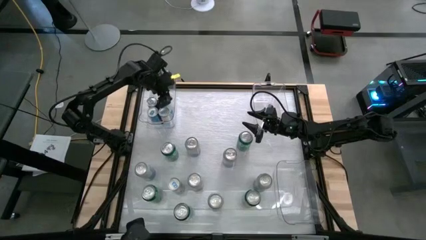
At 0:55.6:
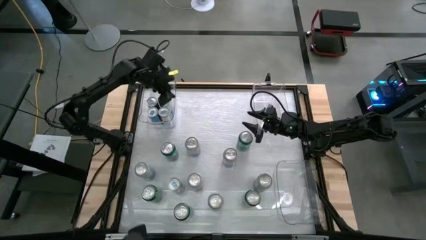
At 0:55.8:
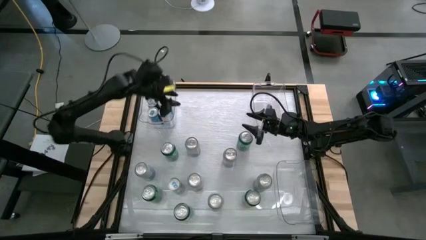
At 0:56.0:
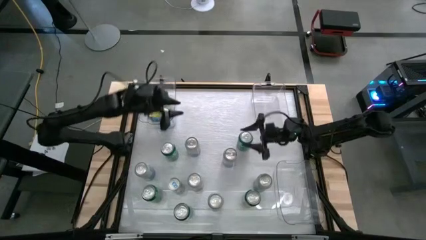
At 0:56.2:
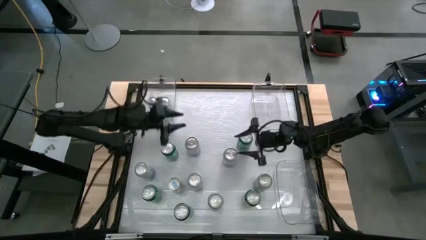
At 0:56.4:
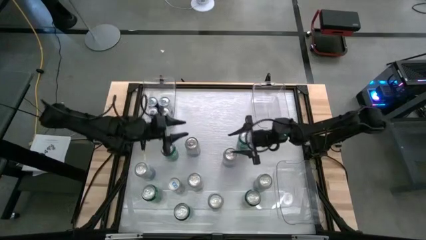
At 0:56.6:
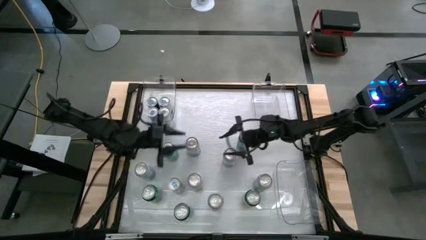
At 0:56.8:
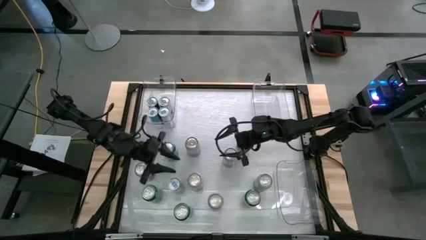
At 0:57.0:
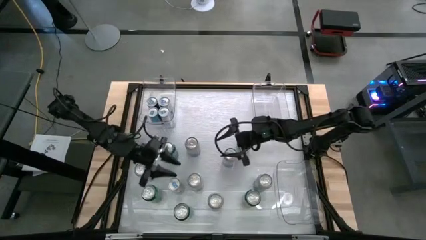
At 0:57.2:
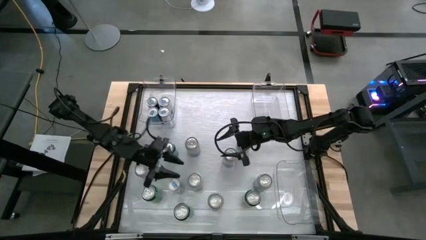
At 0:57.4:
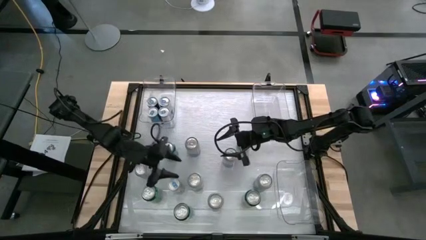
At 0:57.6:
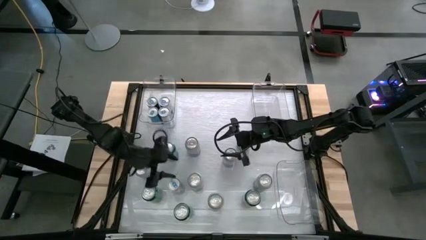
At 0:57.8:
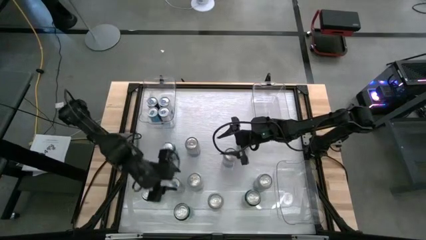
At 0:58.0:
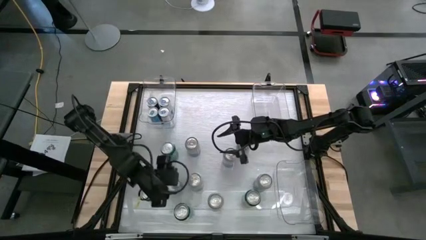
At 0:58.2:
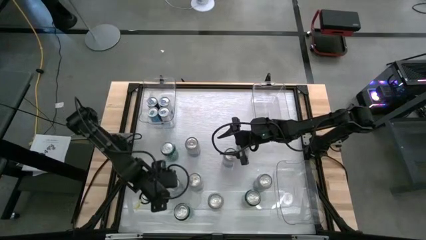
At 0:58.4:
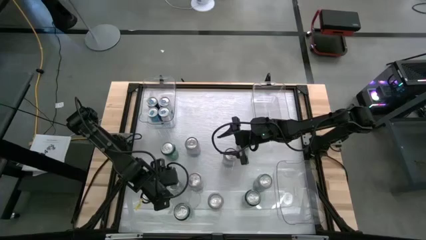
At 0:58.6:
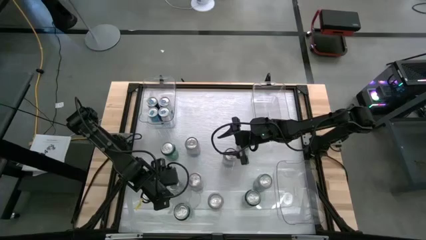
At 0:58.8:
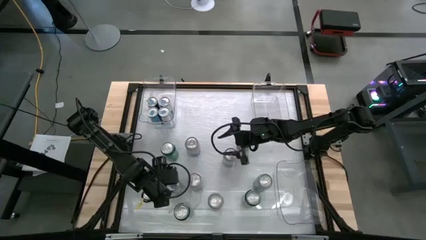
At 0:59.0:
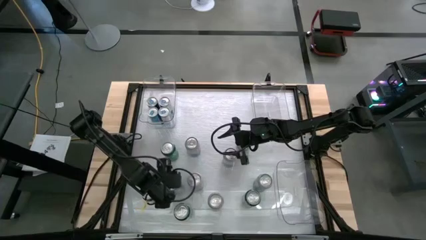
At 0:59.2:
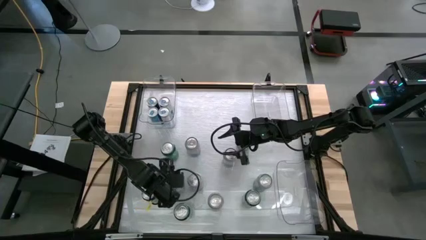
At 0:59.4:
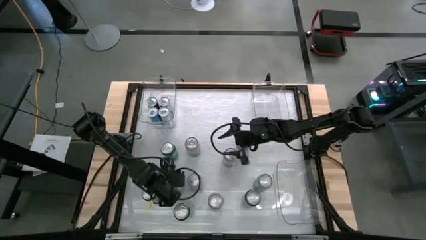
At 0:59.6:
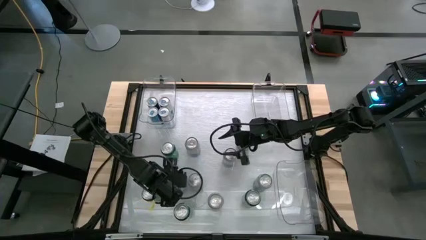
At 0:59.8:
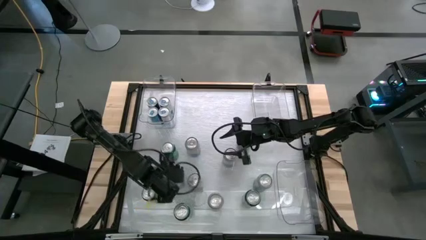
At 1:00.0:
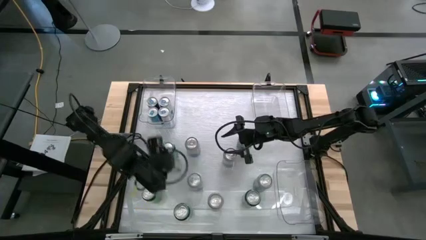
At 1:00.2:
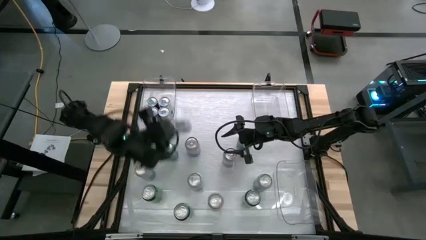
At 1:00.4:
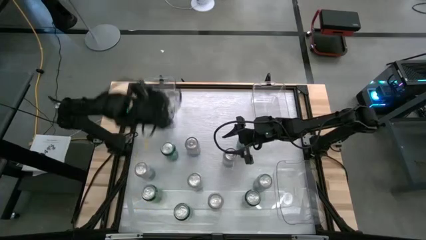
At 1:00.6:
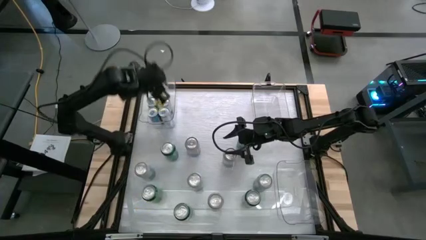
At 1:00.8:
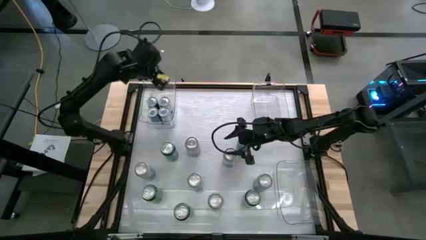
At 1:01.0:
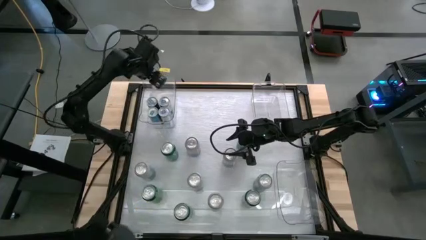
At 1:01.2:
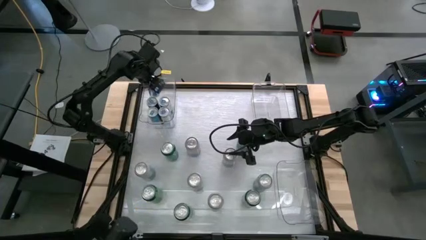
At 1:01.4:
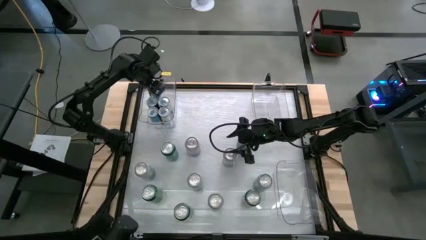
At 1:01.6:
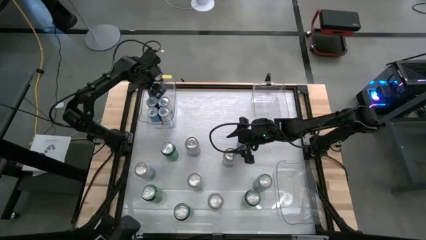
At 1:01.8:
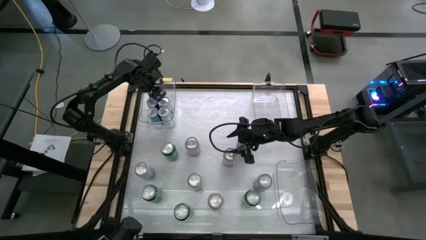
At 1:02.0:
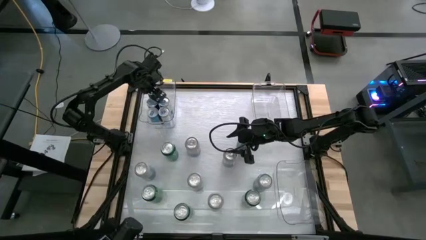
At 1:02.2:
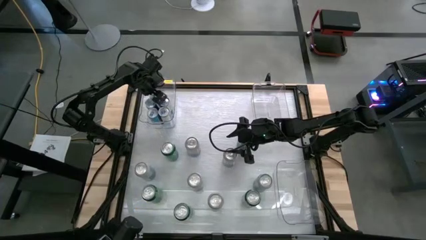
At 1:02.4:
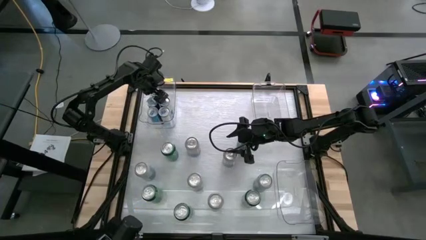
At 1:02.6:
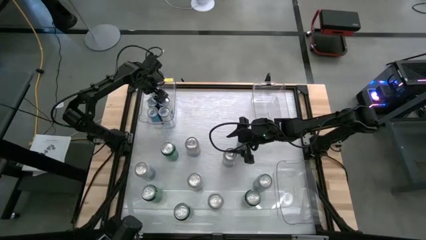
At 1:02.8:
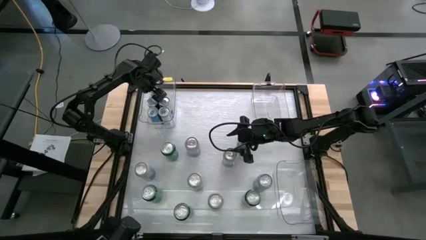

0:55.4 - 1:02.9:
Task: Sort soda cans
Put the blue soda can into the top left transparent bin

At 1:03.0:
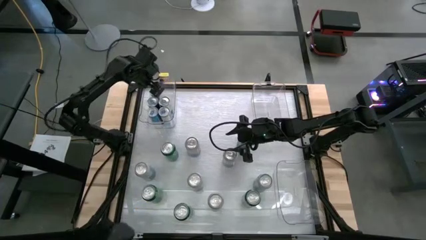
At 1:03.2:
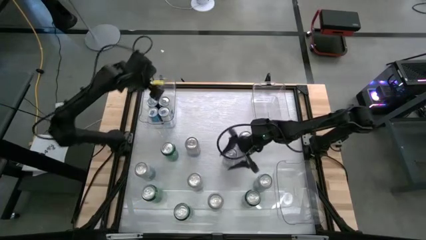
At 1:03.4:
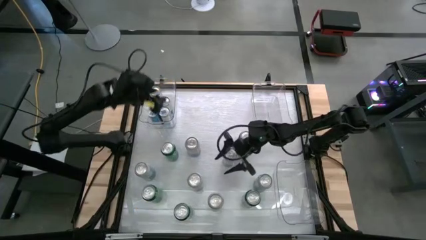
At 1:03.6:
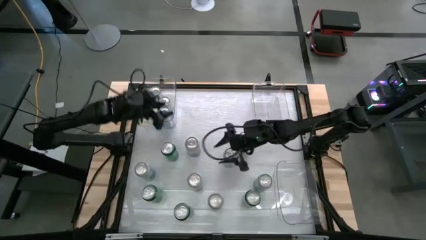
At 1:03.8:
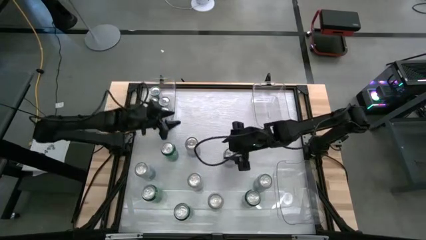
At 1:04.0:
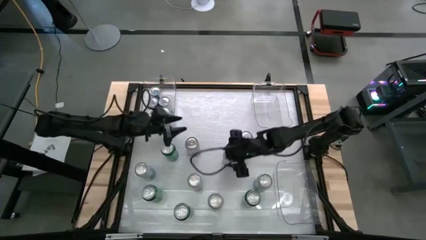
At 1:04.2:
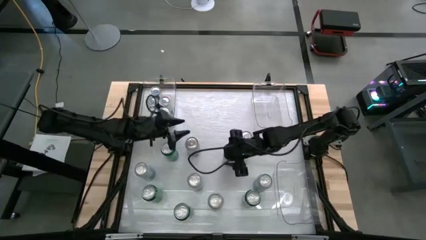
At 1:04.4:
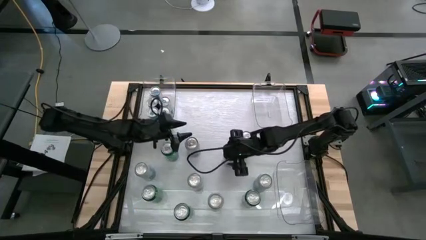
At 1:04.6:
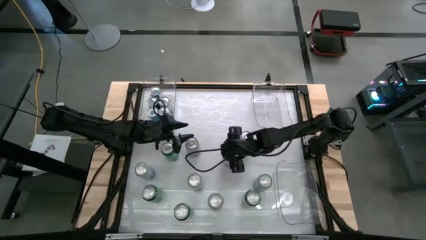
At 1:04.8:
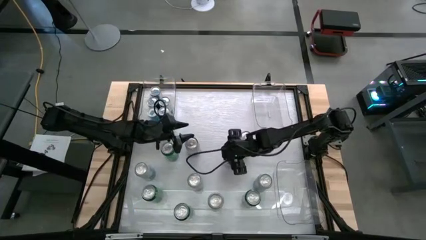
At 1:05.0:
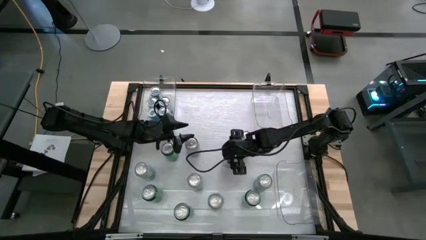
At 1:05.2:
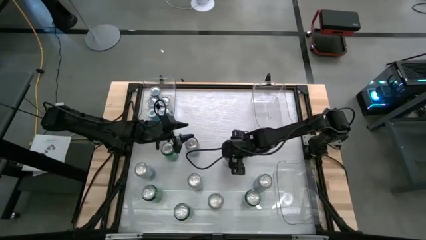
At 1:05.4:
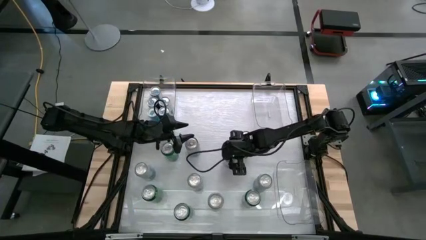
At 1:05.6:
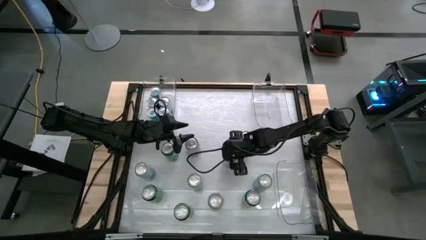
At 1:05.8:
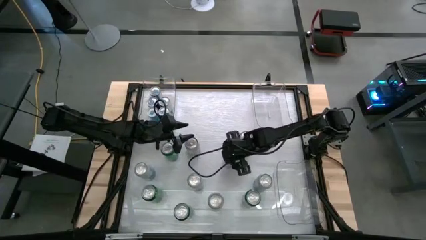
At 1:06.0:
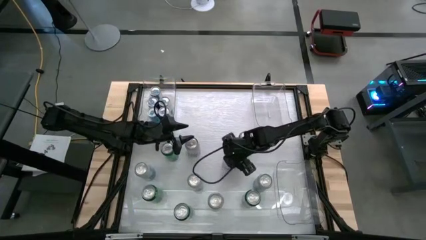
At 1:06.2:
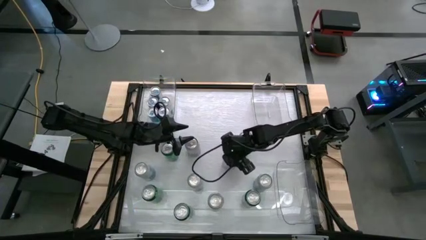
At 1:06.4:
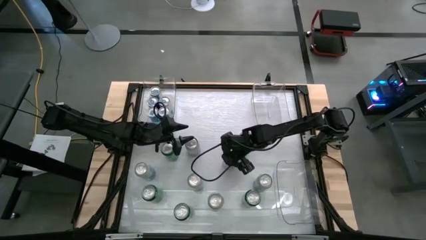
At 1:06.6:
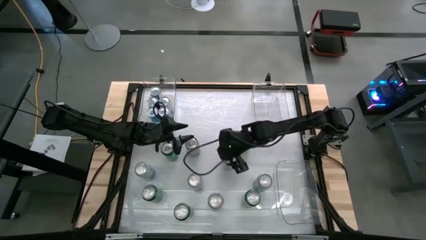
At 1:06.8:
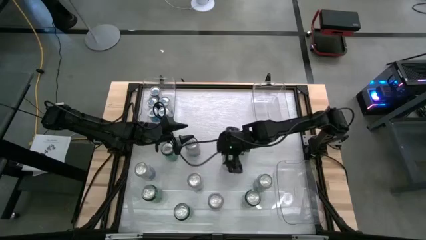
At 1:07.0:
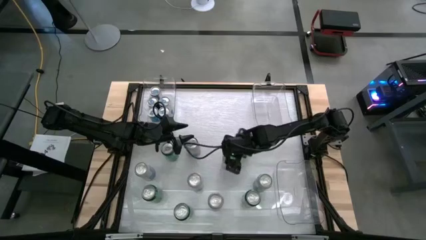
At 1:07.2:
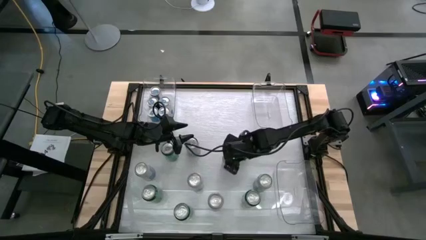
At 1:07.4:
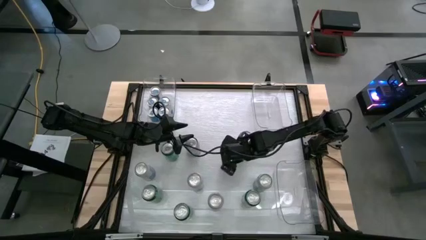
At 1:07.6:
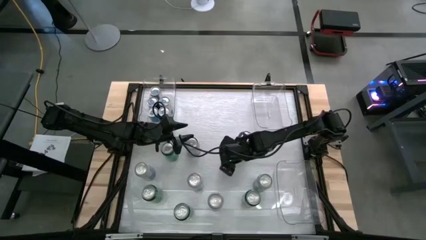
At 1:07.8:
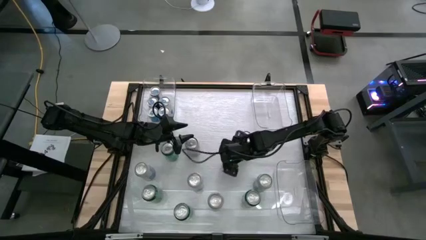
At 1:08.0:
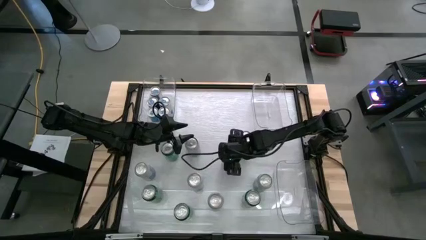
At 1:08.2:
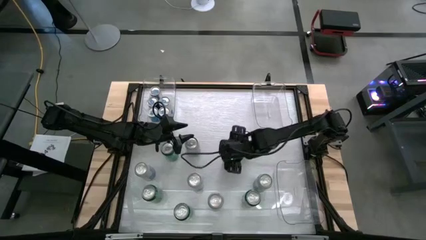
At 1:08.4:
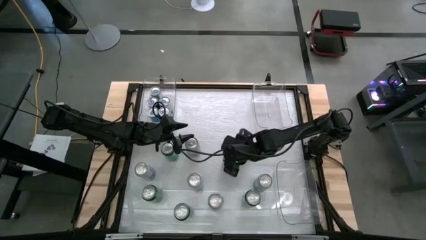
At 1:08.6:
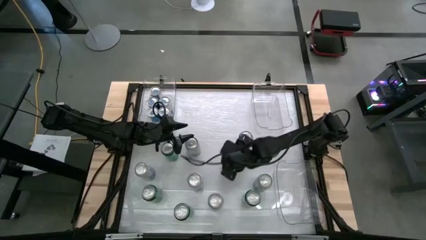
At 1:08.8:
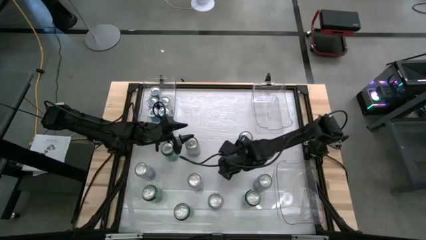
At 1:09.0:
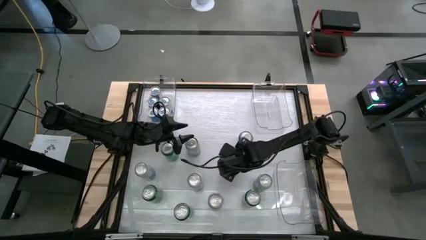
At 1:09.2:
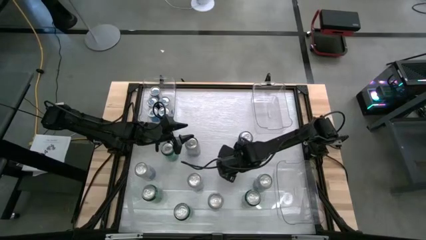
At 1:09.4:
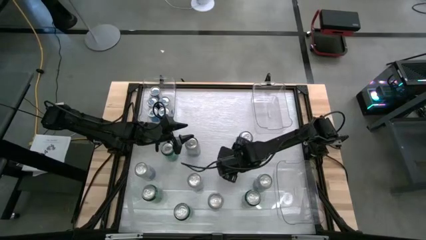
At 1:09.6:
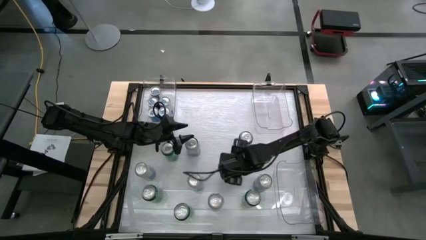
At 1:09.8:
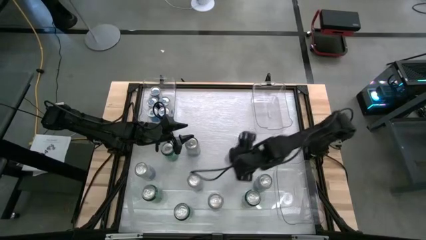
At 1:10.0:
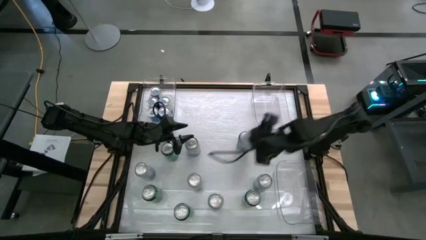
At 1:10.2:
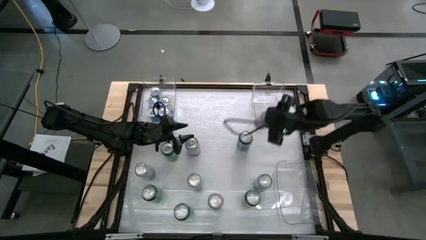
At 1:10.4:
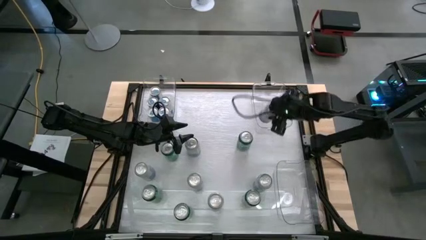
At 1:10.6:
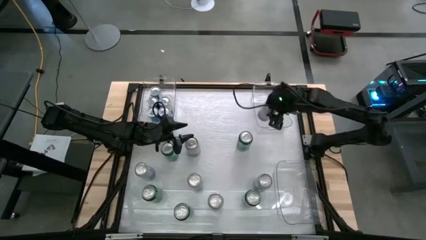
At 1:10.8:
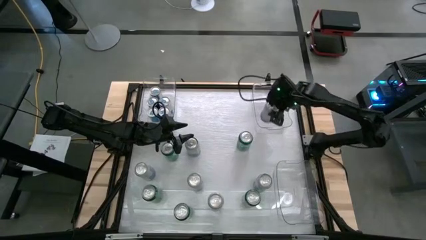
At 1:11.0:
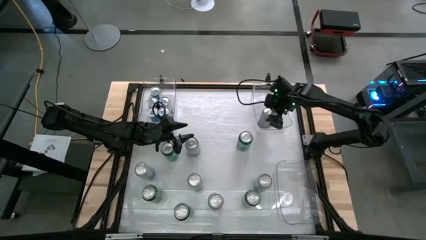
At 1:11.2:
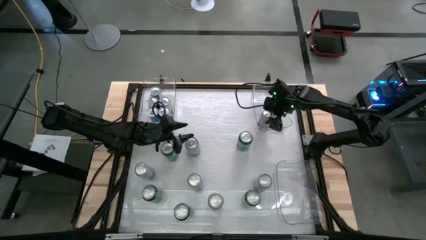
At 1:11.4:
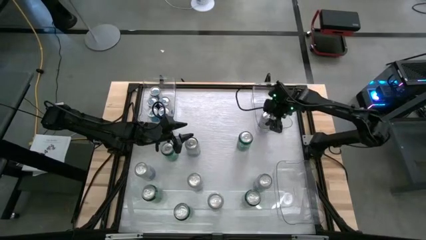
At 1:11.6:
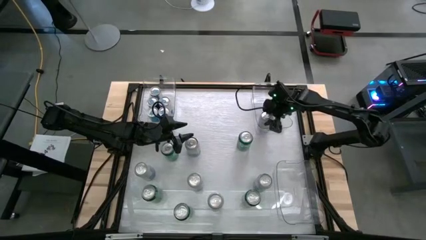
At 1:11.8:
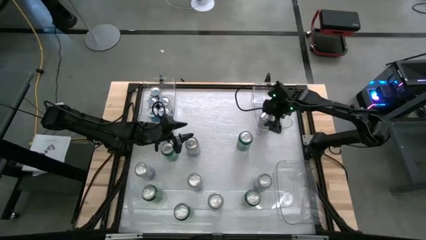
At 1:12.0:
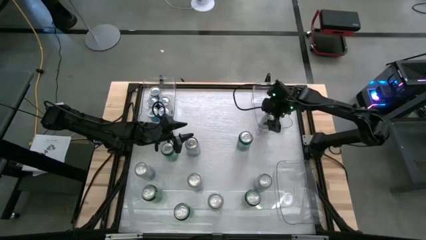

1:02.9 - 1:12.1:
Put the blue-white soda can into the top right transparent bin
